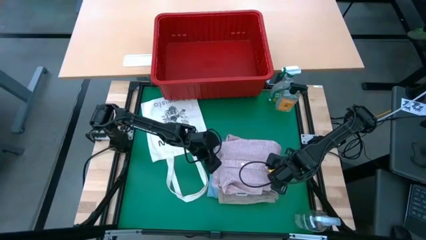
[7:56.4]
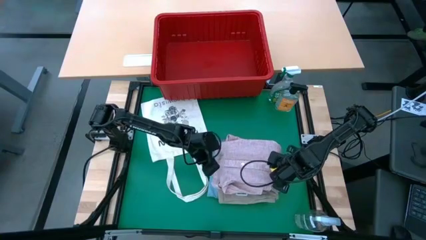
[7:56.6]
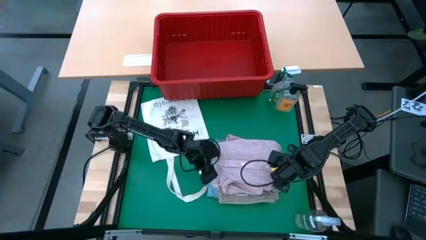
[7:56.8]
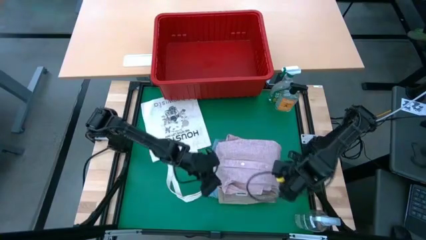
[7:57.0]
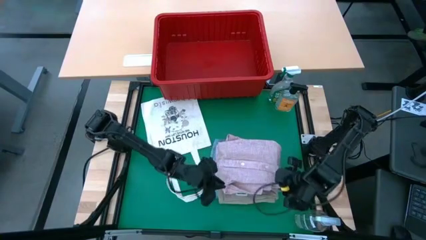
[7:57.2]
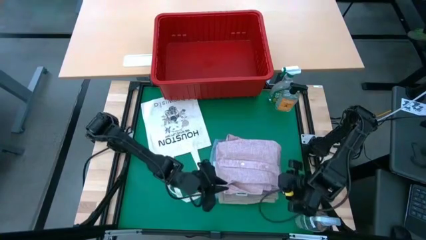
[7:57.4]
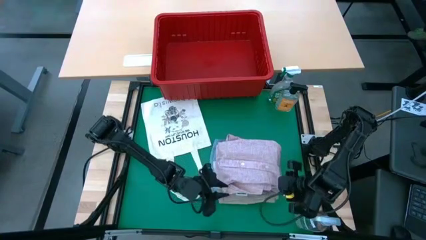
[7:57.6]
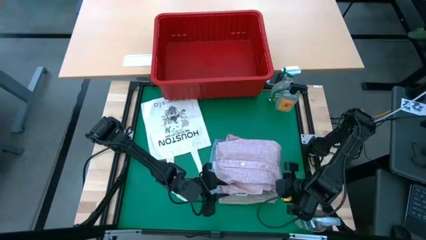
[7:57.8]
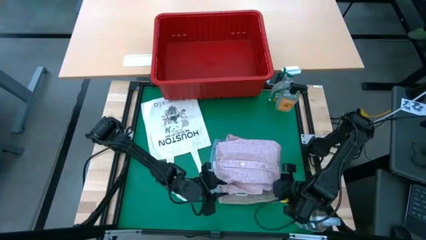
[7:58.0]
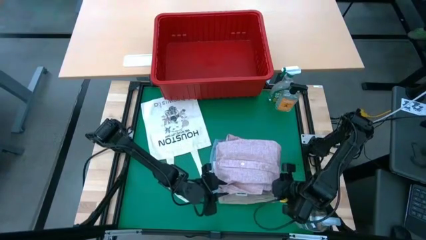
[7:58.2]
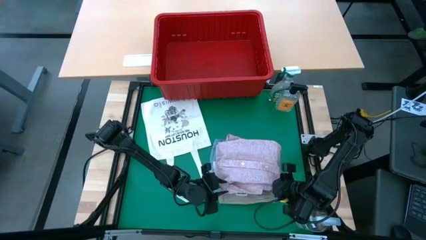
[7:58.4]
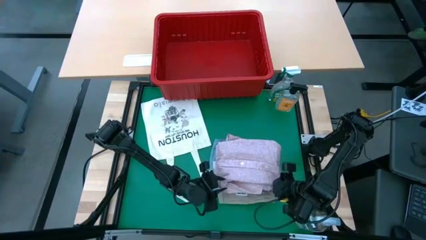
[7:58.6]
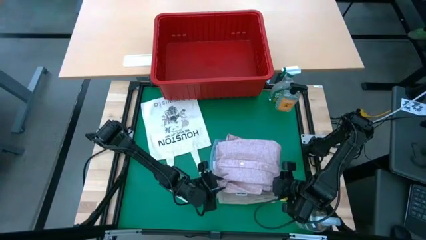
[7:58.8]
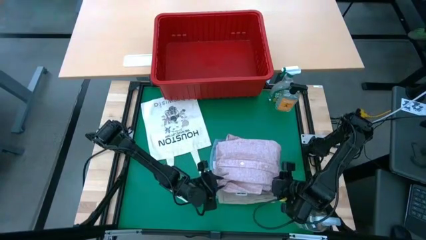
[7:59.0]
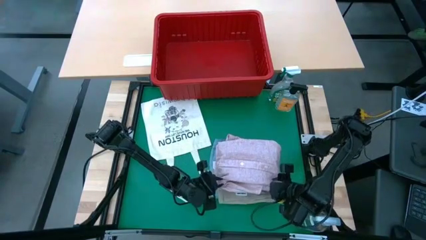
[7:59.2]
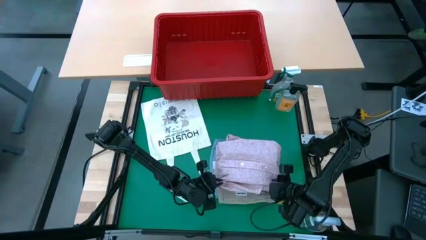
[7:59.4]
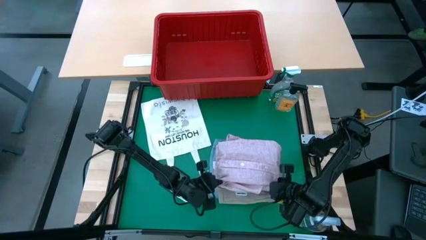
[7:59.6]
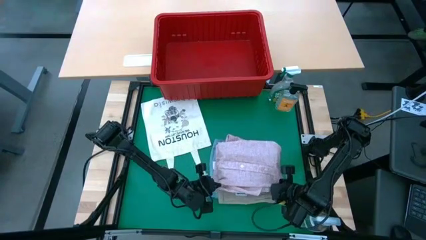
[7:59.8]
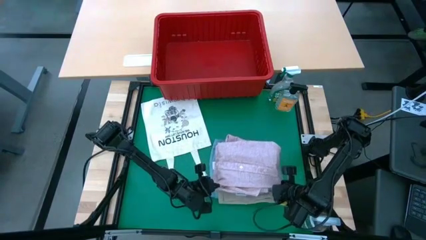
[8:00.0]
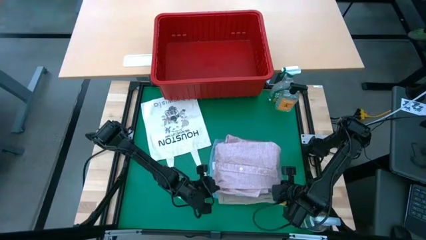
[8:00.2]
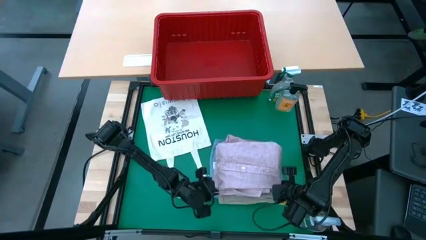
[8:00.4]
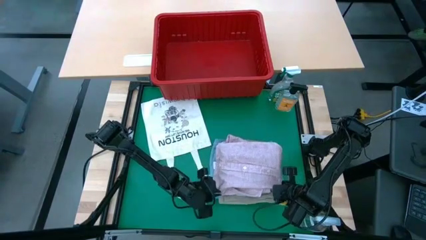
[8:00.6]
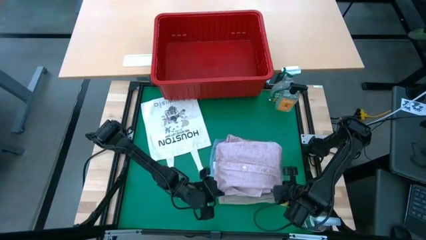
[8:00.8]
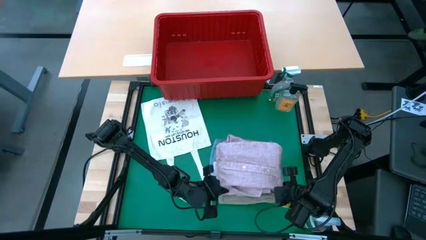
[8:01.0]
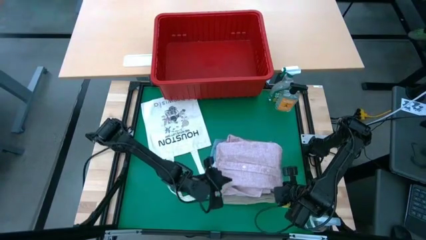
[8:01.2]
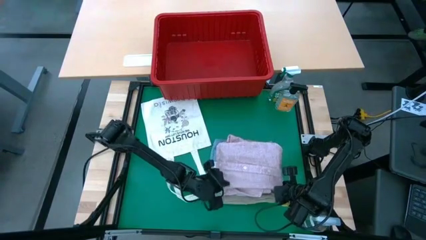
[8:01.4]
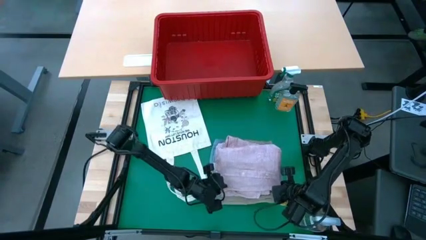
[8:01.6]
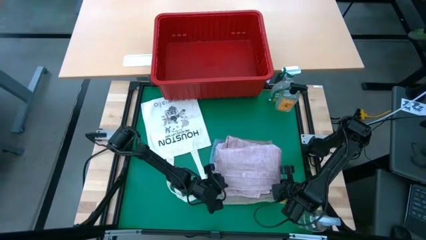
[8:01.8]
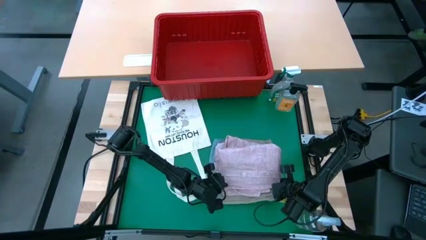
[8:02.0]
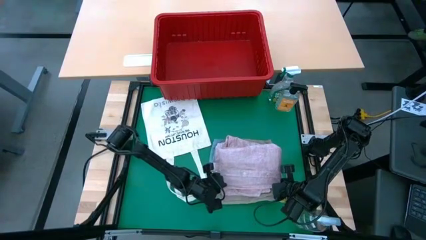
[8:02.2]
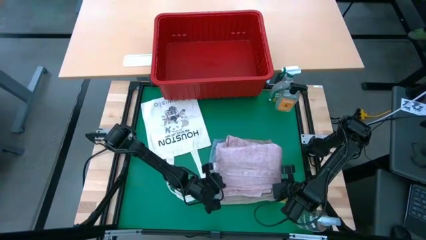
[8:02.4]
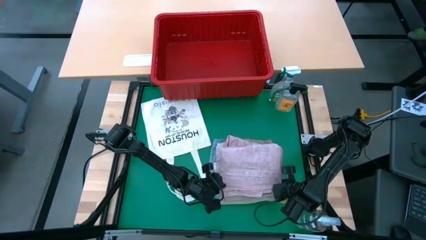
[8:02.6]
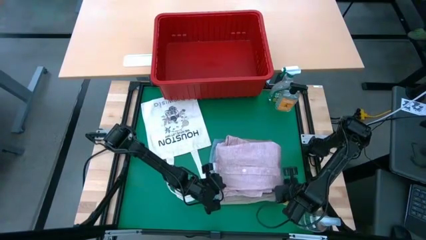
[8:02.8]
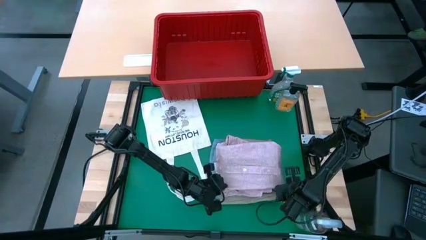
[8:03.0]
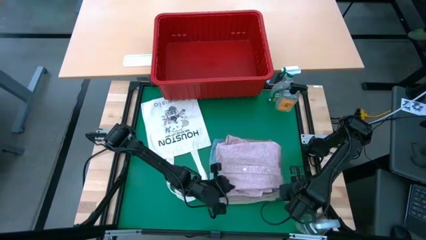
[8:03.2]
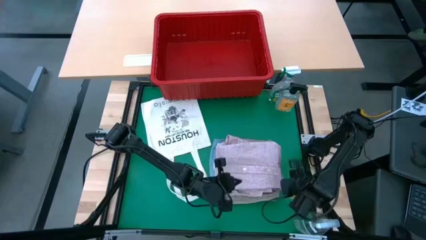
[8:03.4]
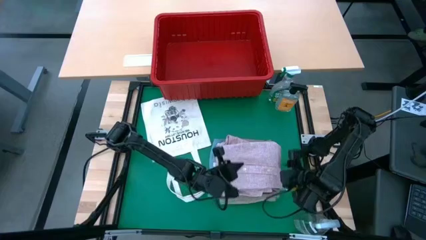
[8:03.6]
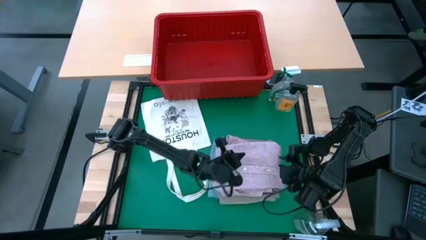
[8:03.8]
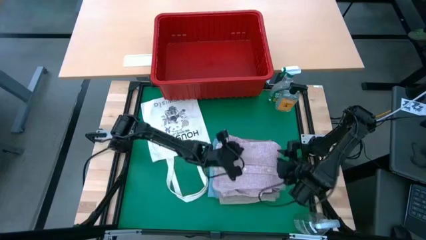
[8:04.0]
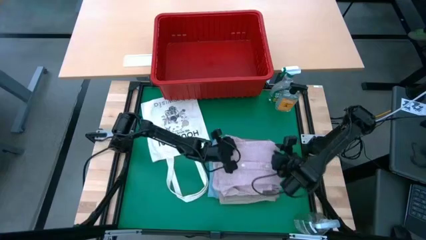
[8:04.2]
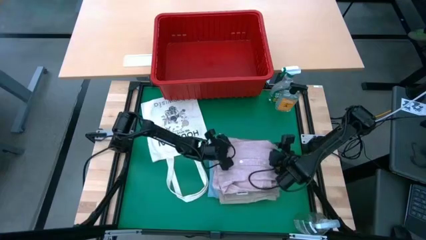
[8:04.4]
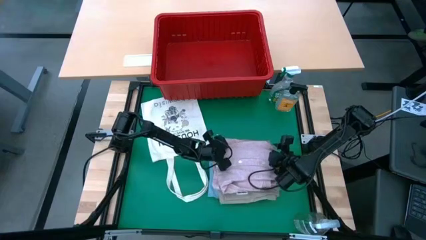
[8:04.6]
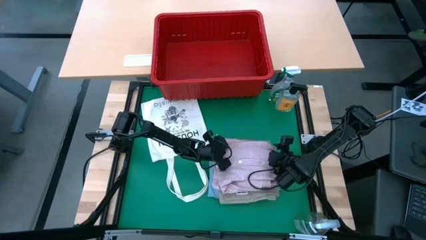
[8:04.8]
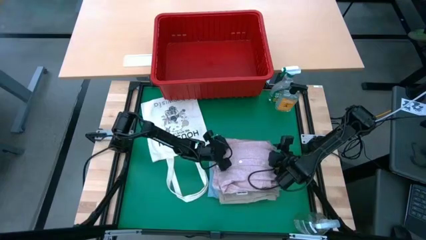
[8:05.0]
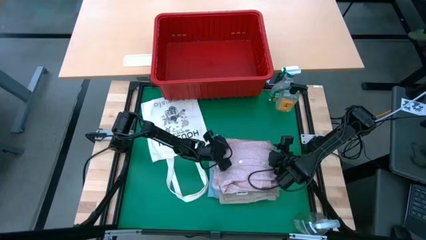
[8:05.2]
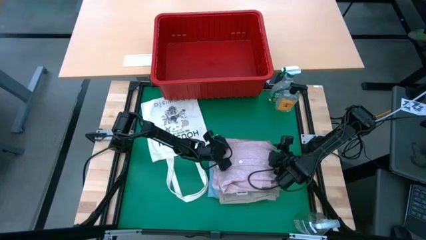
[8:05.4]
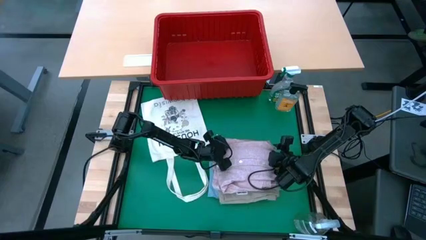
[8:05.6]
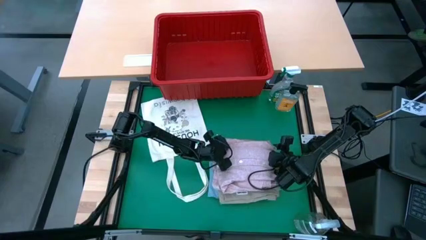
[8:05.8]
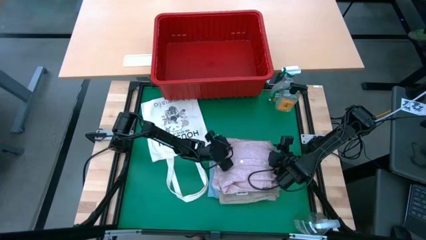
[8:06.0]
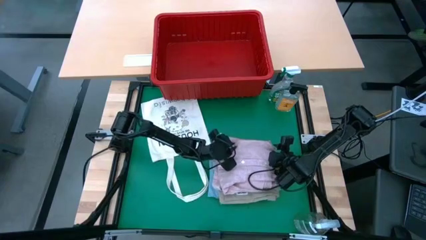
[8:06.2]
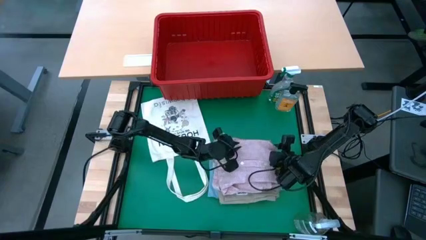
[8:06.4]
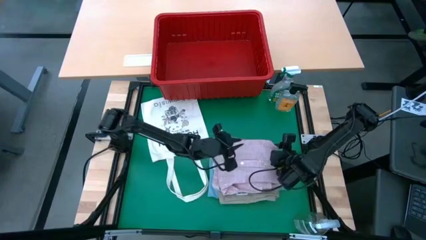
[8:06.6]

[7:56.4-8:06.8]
Task: Fold laundry
Stack the folded pink polo on top of the folded white underwear
